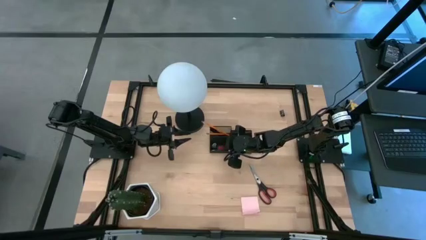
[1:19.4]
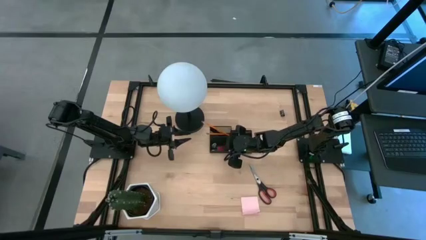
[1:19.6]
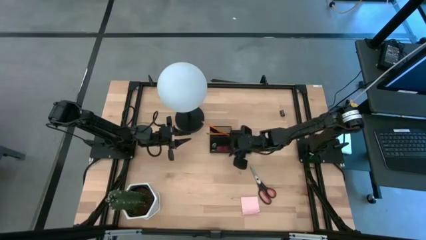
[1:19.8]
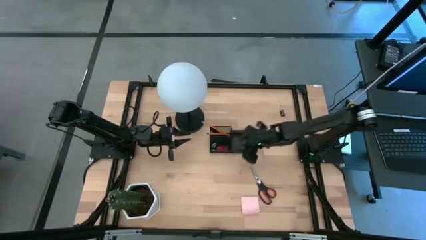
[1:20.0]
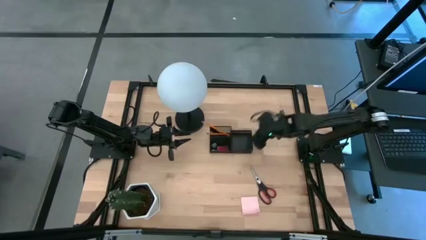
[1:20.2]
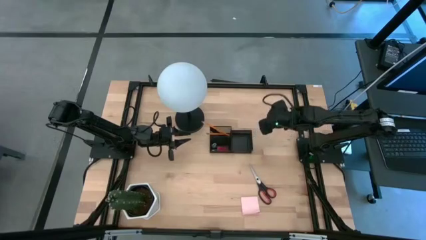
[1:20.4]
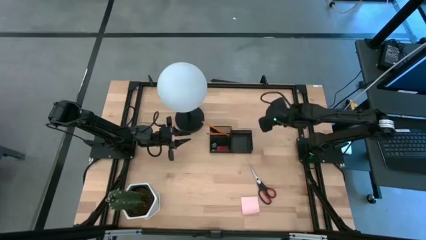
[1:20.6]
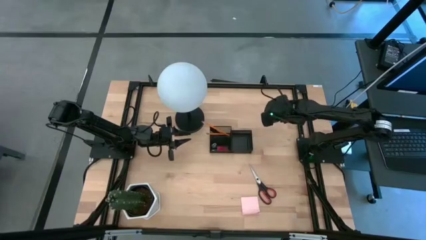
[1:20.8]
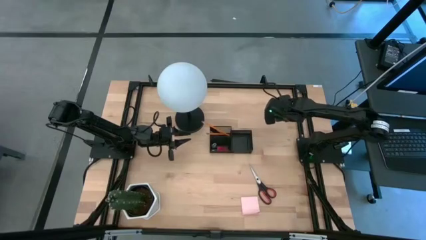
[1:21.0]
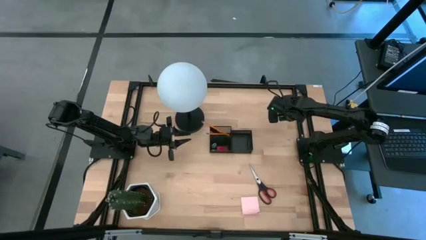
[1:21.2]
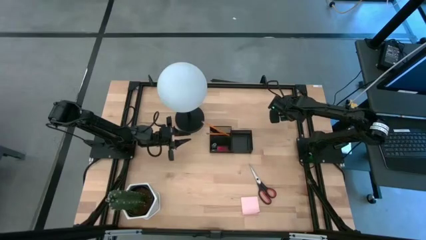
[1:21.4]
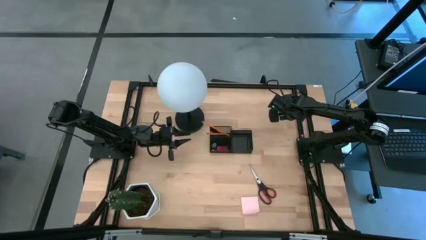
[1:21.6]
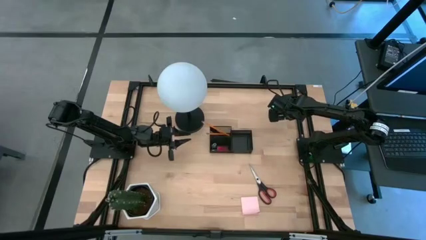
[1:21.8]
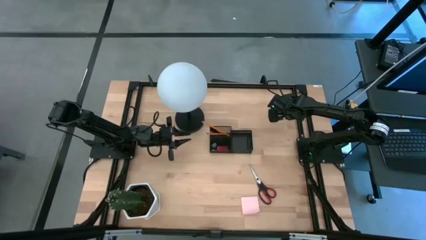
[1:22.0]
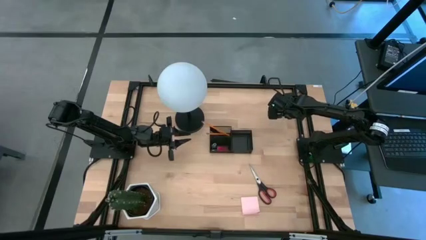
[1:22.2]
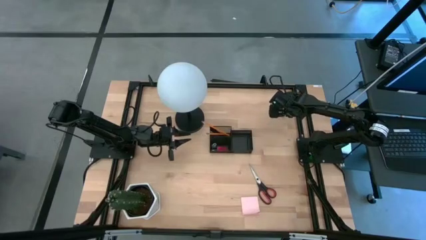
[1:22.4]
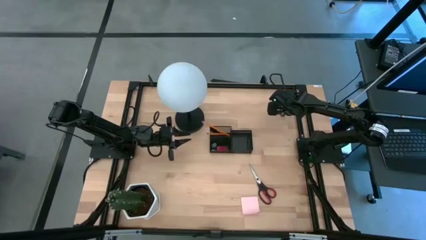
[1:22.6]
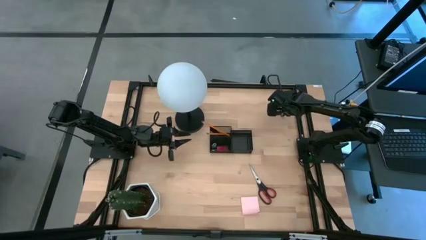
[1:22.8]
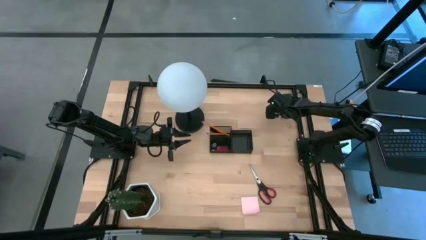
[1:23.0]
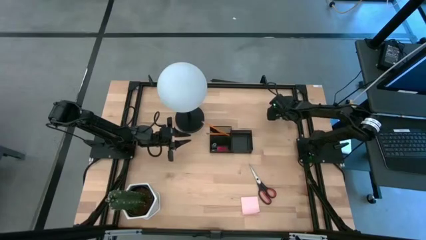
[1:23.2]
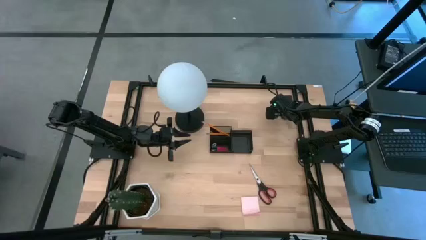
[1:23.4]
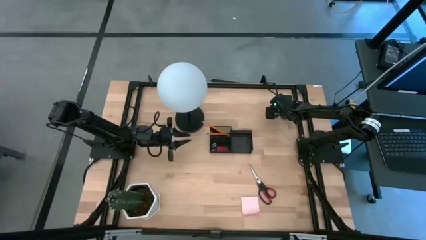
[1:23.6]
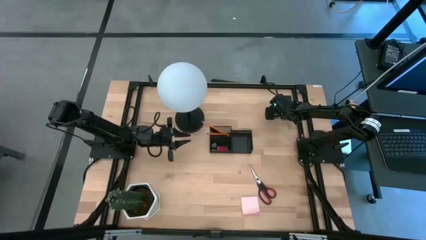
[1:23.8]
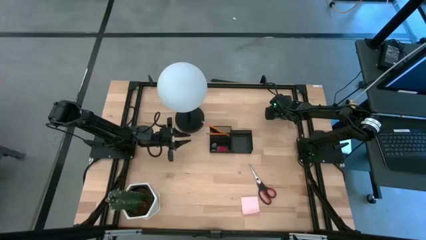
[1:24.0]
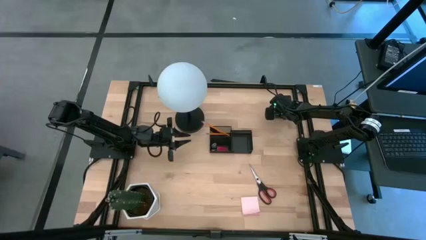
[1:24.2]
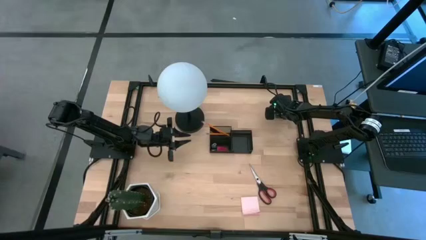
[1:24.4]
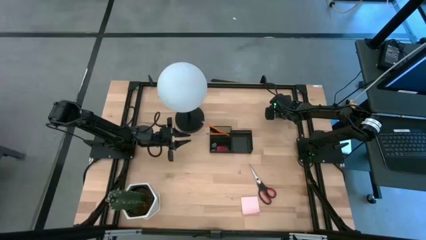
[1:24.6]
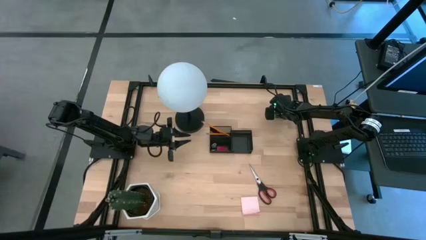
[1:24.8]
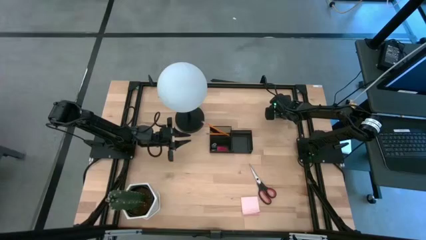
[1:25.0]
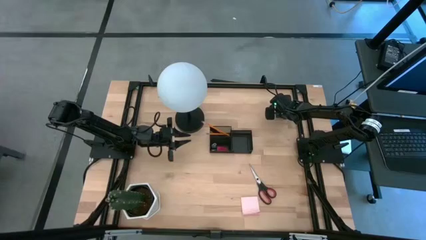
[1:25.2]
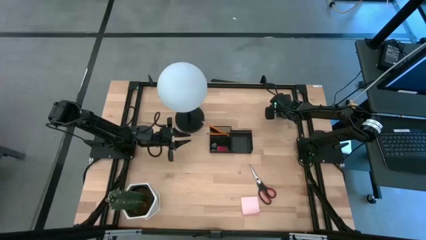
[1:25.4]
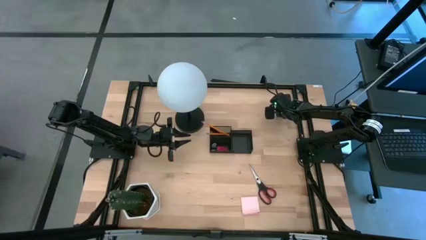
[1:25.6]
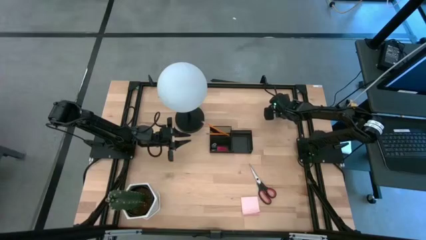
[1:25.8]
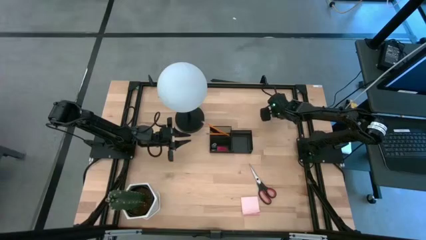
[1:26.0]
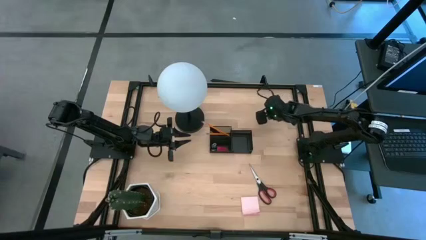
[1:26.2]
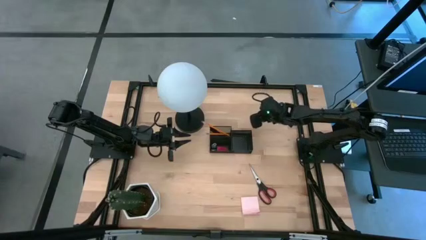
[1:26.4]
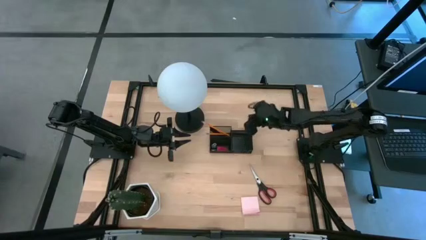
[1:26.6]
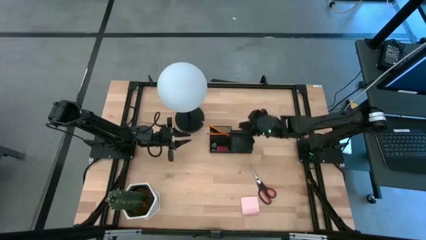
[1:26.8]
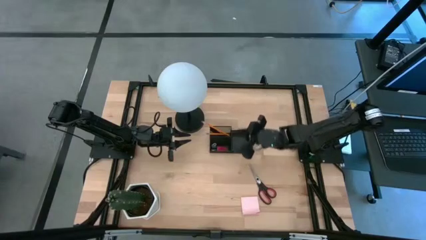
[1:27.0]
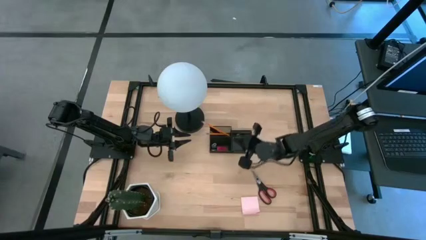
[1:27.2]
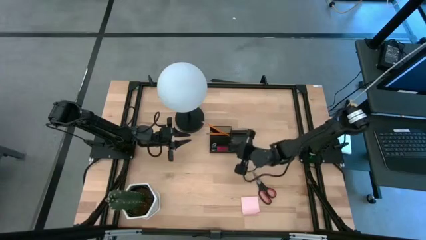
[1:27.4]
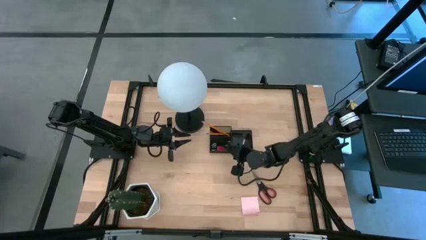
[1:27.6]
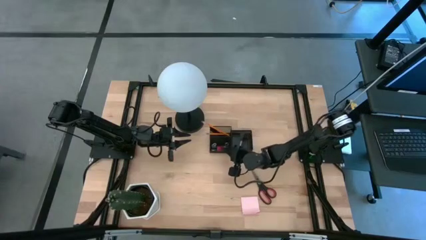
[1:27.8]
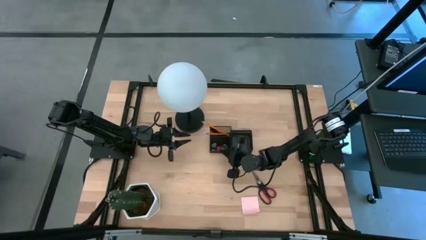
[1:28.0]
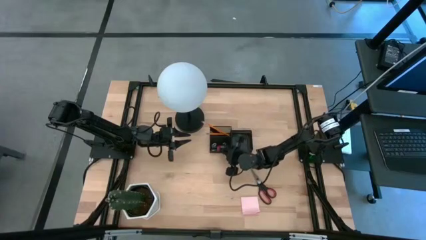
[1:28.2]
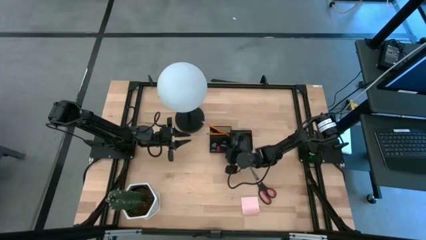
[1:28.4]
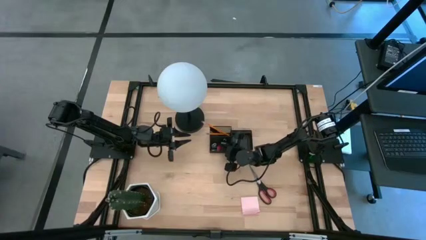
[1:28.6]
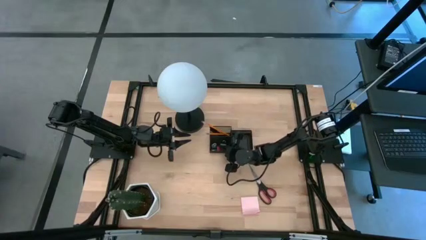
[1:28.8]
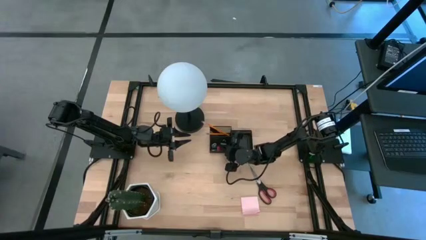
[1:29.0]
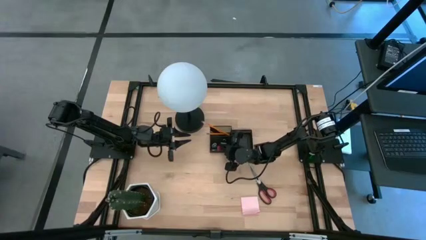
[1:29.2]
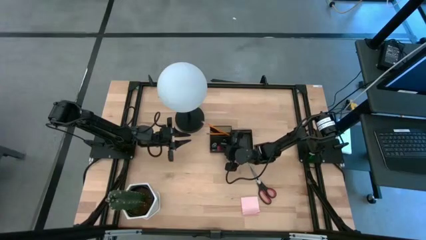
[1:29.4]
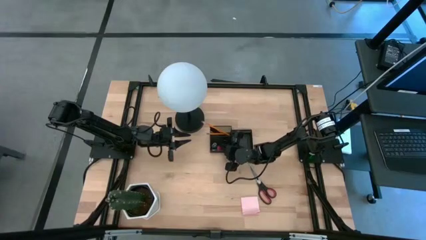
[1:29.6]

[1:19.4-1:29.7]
Task: Pick and place office supplies into organizer
Put the black binder clip into the black desk organizer

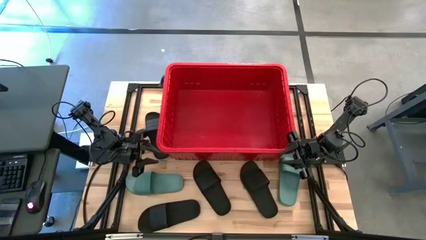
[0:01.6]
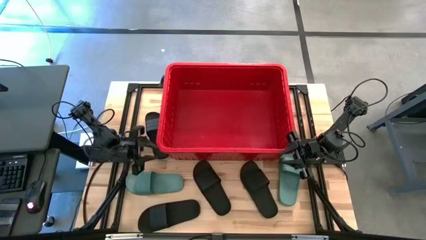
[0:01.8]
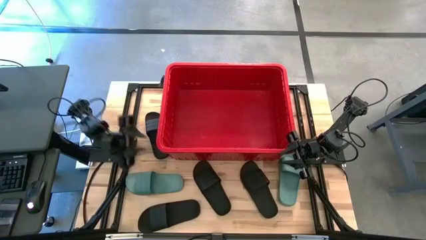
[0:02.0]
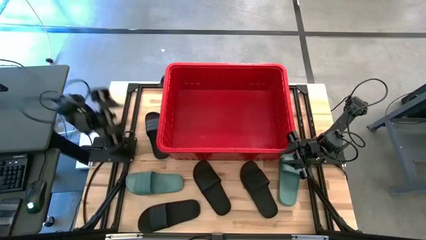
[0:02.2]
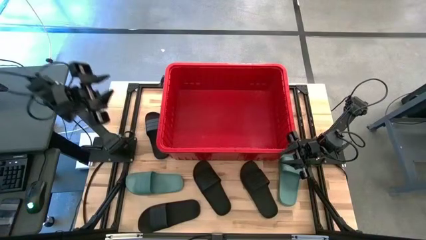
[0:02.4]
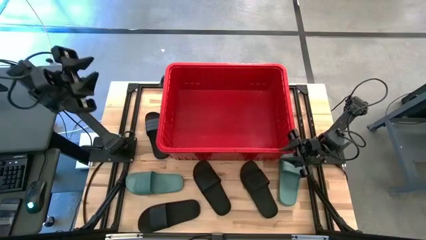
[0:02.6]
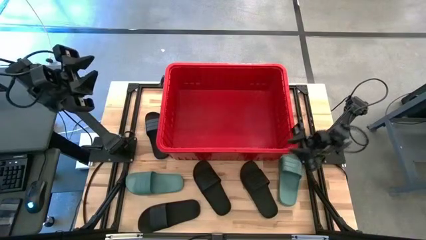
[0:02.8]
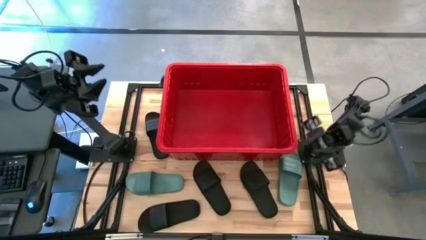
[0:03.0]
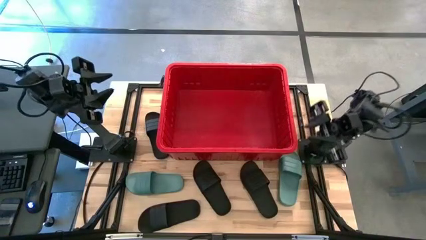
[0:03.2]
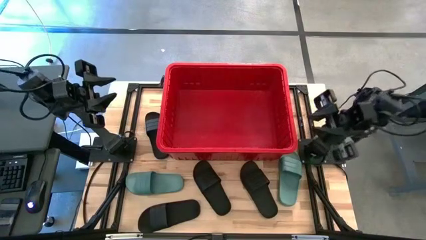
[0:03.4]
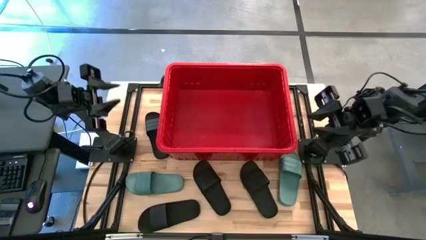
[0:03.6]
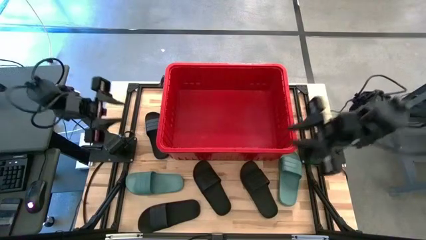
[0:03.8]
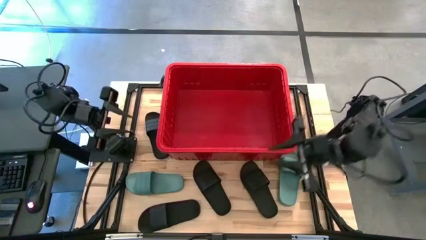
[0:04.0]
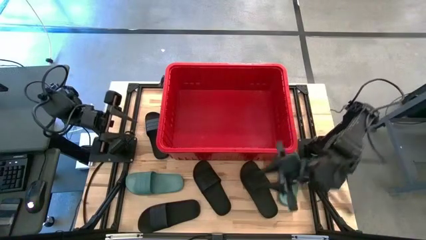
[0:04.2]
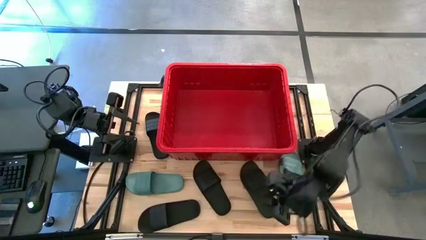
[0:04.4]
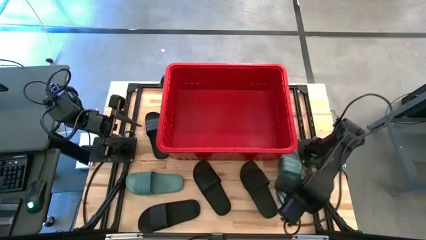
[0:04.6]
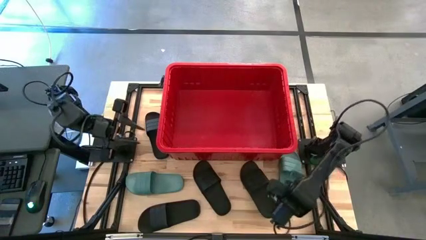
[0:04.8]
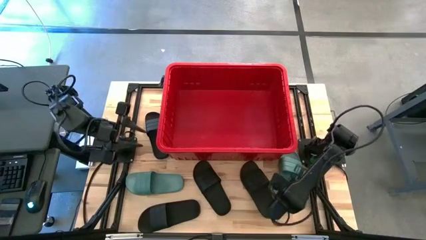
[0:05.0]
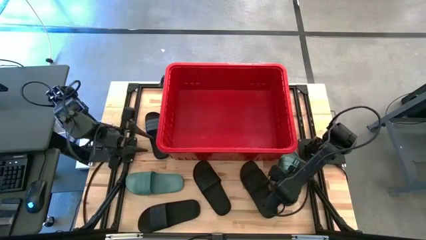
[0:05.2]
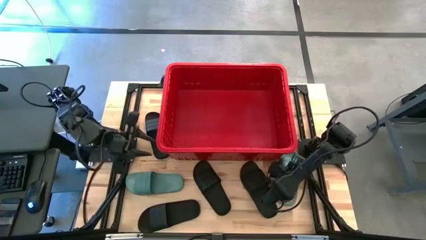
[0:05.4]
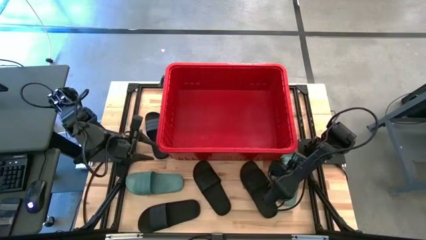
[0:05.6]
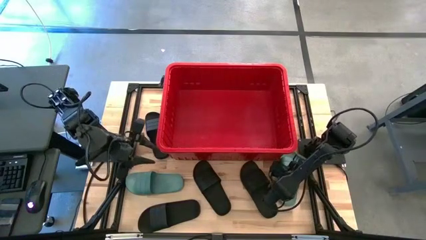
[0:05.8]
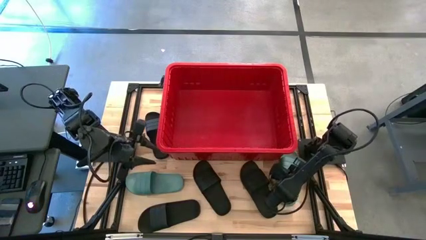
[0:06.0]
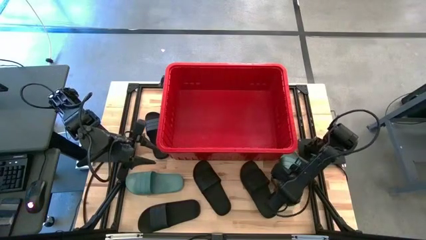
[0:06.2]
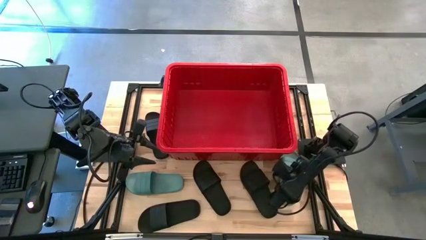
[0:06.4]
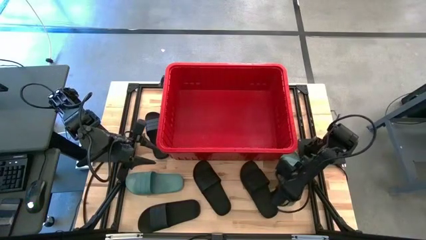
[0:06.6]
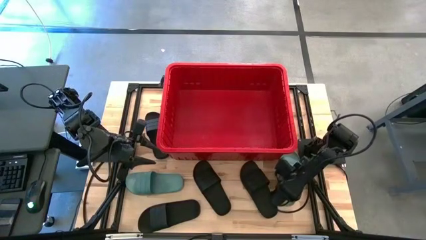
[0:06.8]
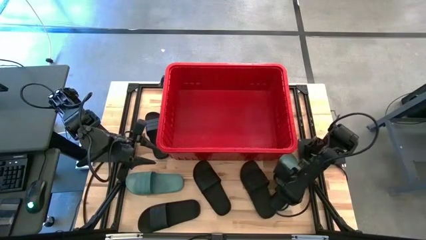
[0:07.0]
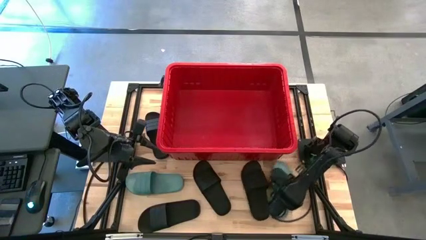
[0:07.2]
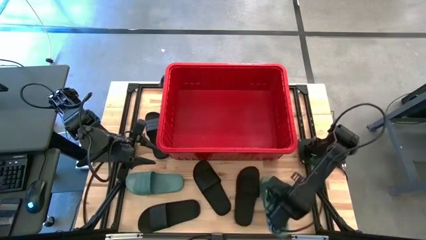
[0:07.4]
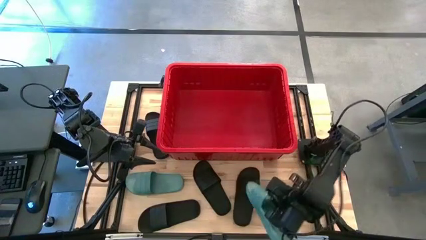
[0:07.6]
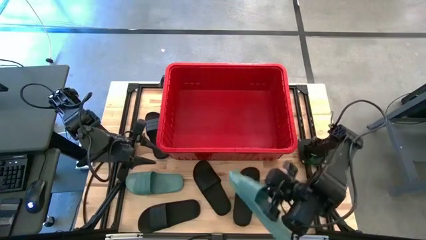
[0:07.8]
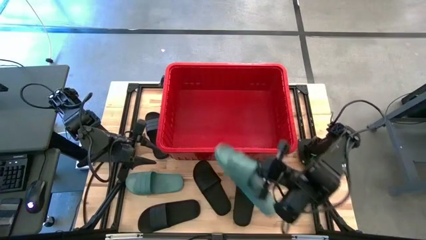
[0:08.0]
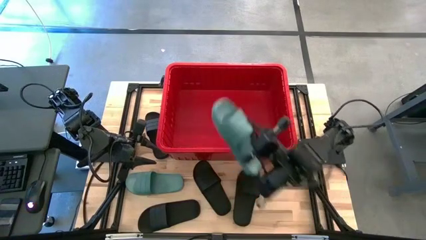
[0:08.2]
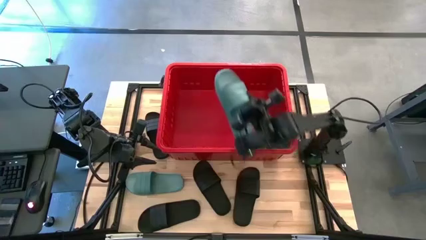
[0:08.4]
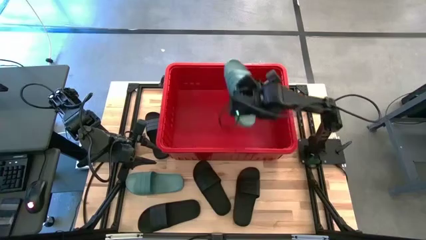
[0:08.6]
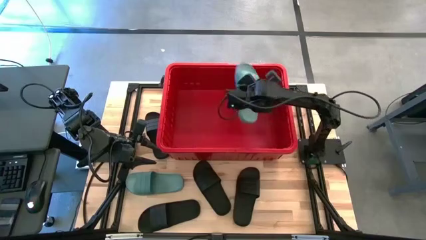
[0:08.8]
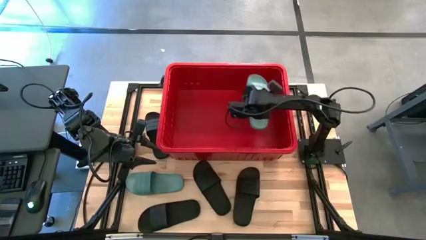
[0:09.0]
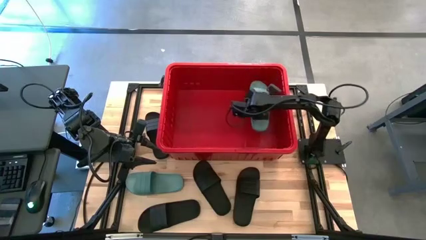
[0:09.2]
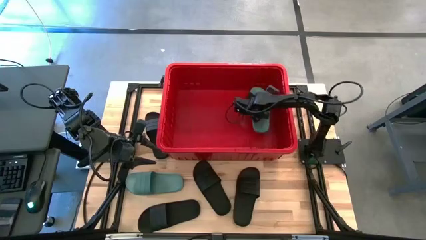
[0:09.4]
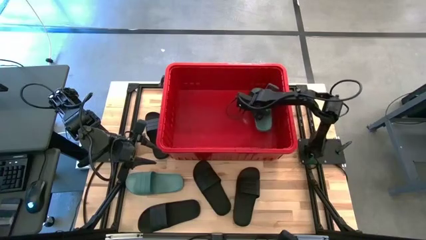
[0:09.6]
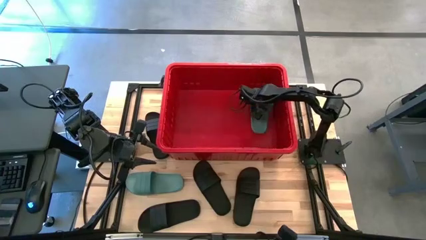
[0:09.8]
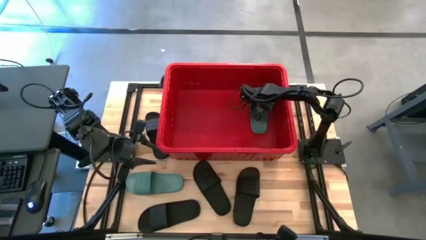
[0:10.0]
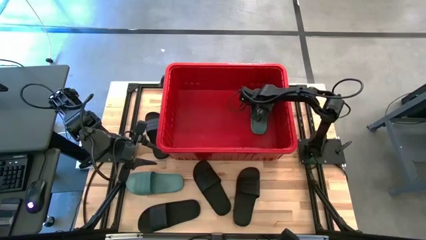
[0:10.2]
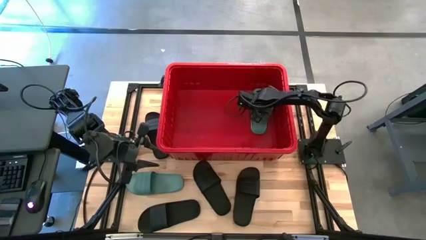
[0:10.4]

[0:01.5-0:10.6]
Task: Pick and place slides into bin
Put the right green slipper into the red bin
